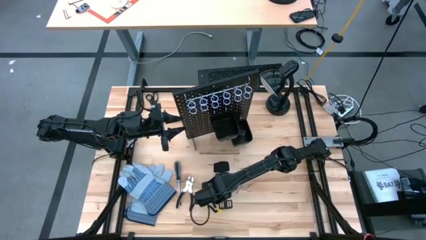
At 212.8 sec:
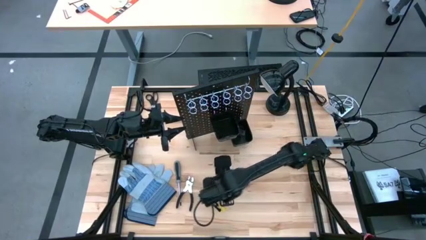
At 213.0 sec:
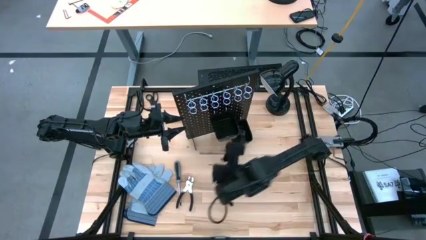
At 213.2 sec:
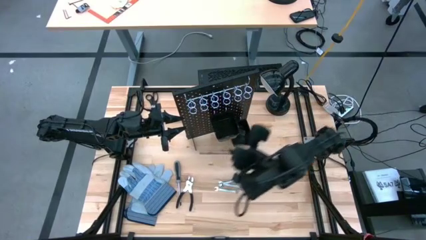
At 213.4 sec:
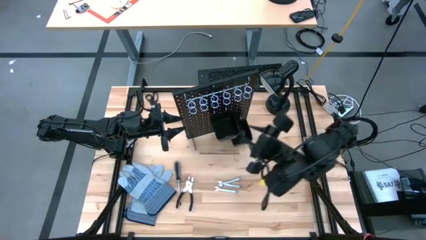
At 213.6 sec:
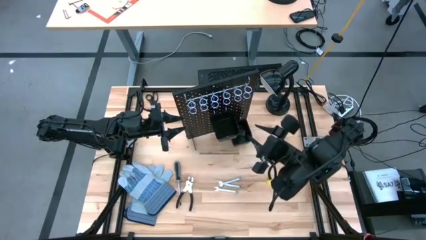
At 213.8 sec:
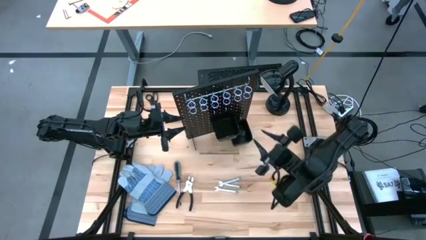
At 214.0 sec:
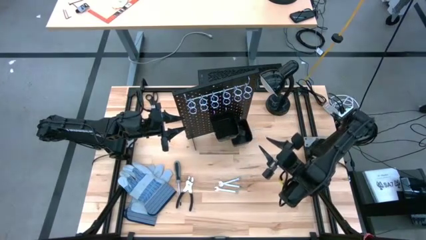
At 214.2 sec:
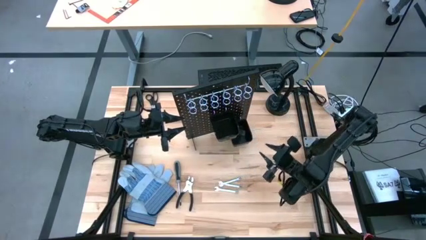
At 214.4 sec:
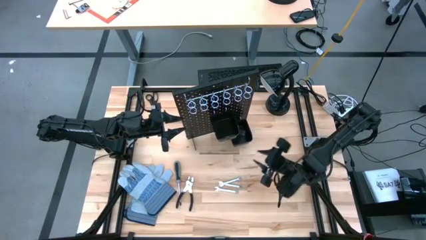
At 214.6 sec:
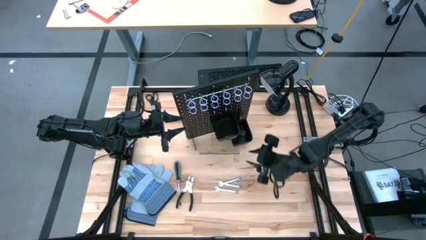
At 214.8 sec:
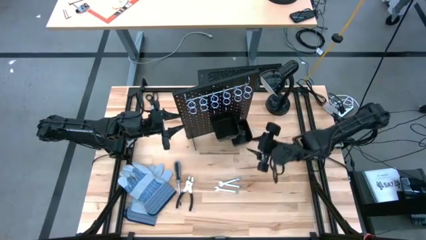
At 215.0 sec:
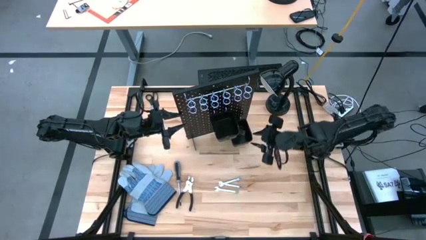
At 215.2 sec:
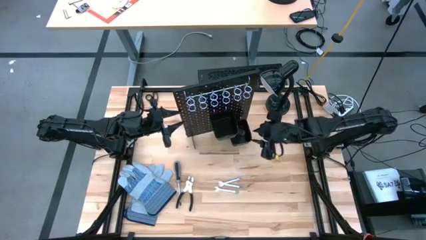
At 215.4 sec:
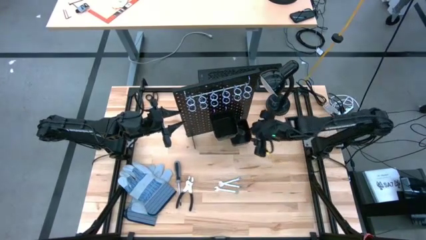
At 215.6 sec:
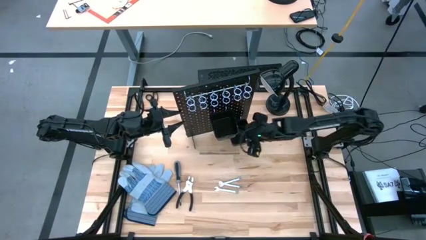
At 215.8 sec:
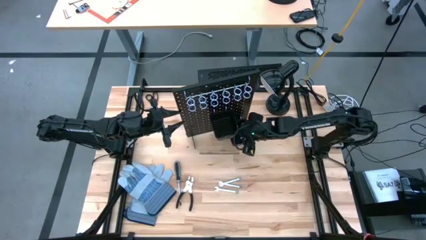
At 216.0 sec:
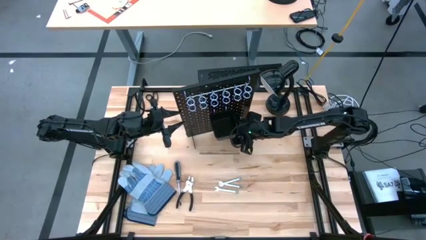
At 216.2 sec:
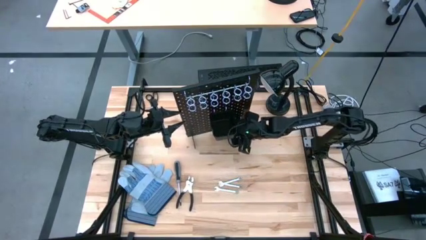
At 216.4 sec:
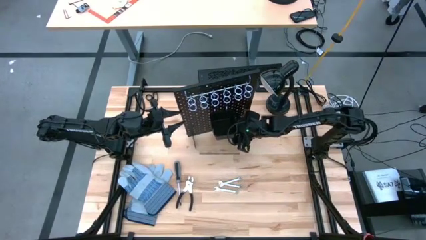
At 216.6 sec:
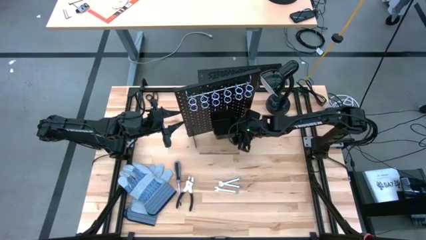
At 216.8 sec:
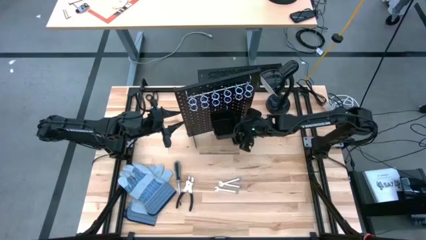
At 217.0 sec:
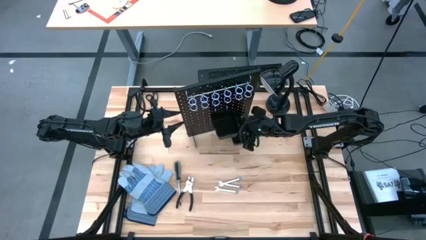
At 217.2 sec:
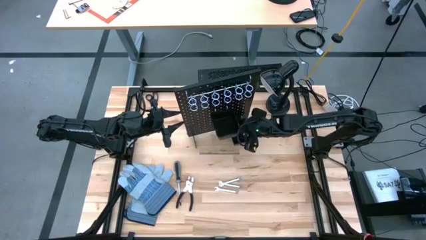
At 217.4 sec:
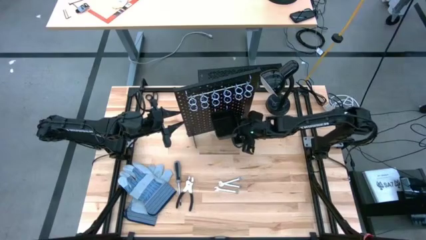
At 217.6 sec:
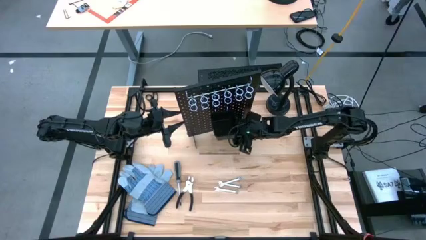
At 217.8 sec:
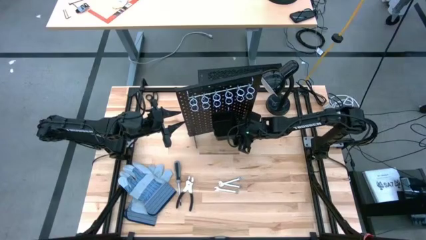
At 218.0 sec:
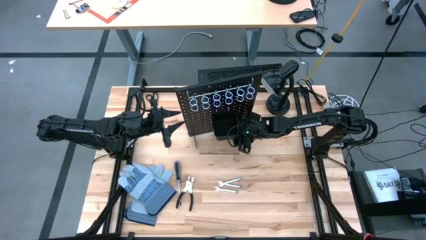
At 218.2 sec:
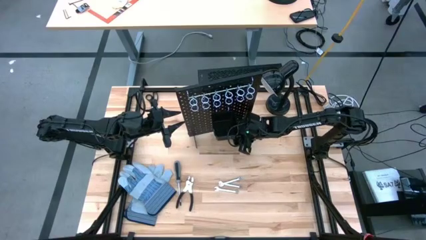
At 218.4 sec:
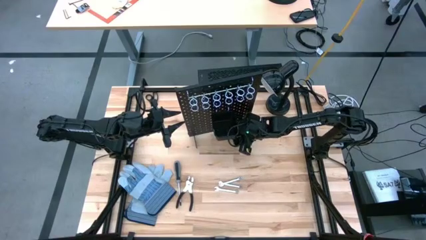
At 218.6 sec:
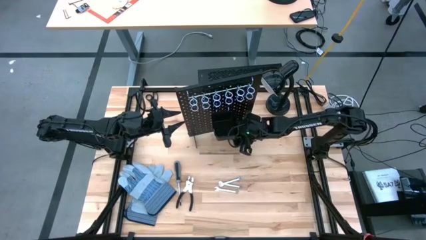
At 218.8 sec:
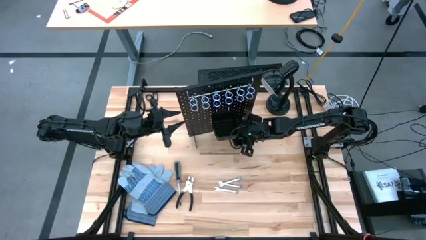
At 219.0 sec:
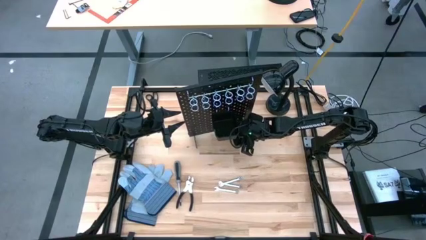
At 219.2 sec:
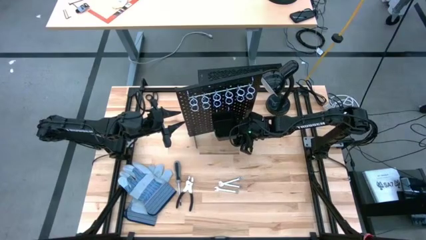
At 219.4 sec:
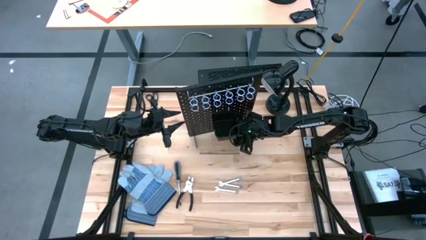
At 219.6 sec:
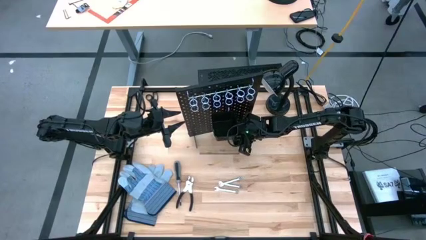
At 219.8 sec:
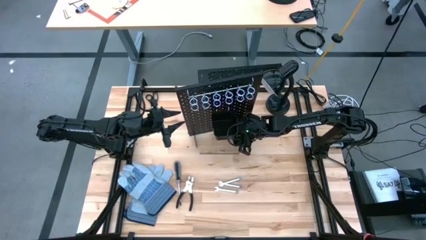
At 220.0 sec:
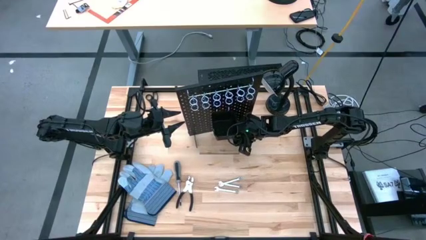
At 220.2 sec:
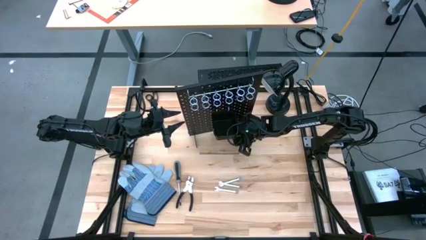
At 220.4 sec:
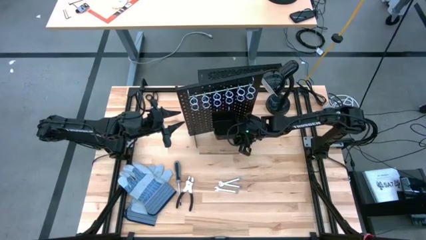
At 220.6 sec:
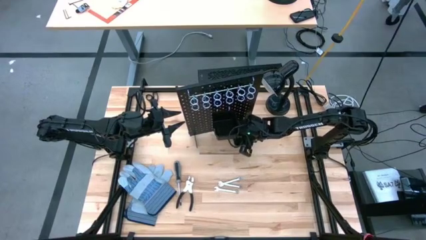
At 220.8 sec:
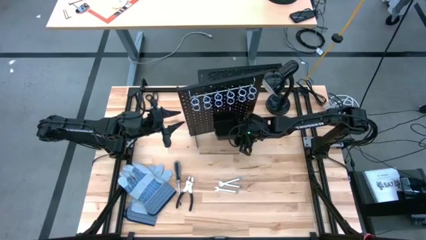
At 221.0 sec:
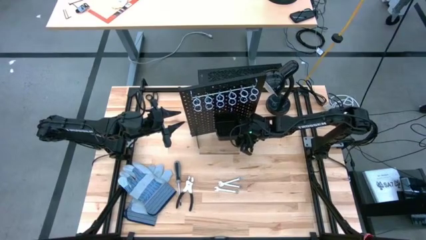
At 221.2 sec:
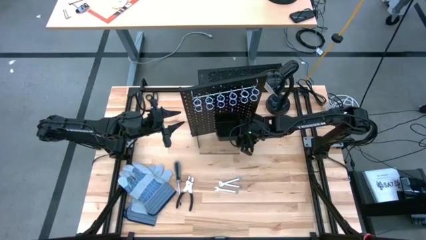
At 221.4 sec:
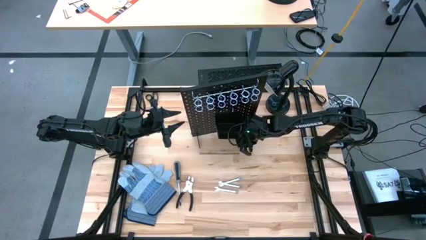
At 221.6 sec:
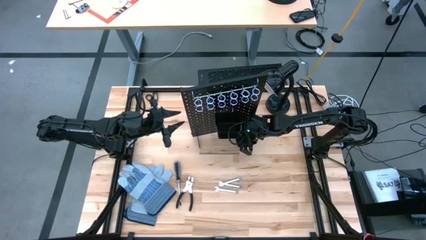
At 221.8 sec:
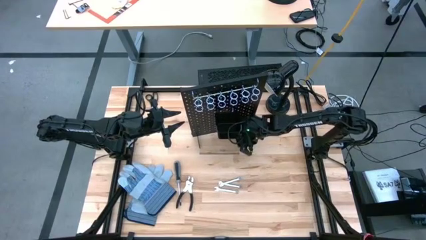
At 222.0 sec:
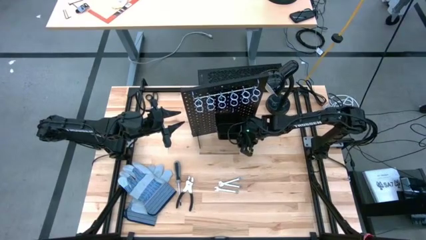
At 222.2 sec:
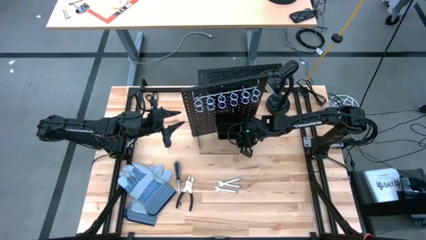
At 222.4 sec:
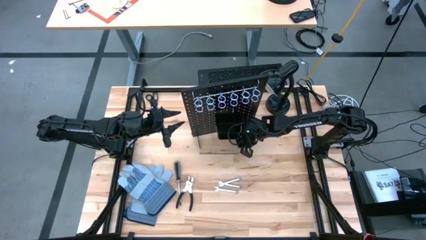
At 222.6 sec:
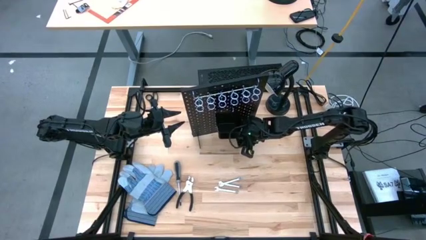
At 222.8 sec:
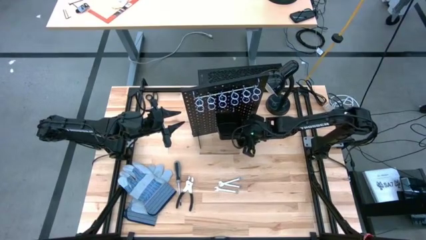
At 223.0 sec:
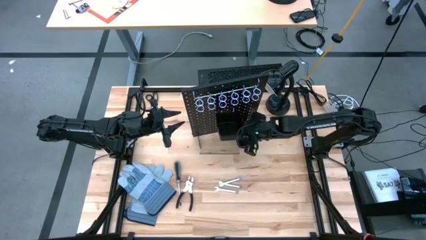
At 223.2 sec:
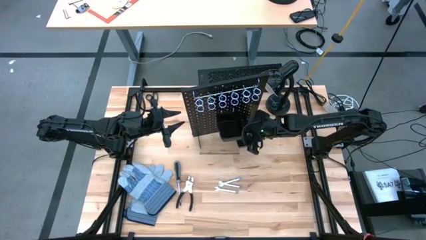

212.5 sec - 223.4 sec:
Task: Hang tools onto peg board
Remove the black utility knife blades from the bottom black bin of the black pegboard

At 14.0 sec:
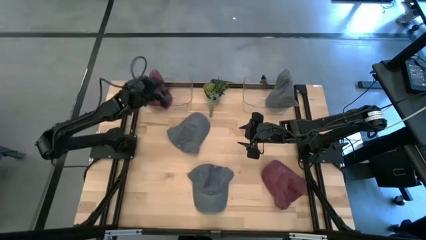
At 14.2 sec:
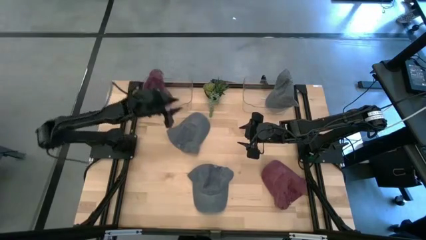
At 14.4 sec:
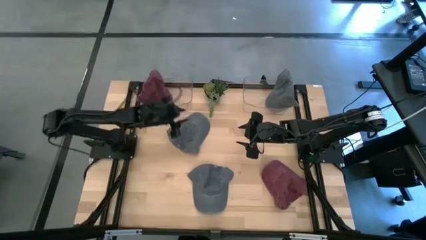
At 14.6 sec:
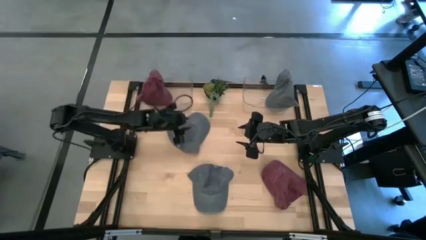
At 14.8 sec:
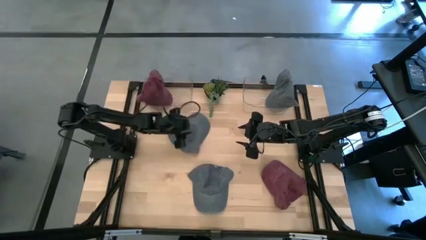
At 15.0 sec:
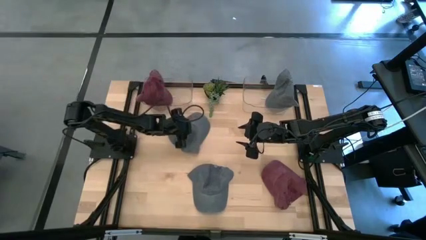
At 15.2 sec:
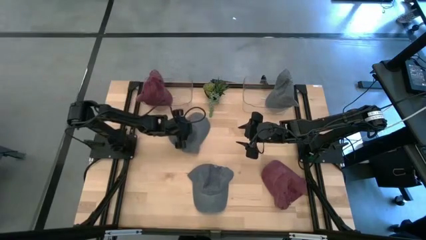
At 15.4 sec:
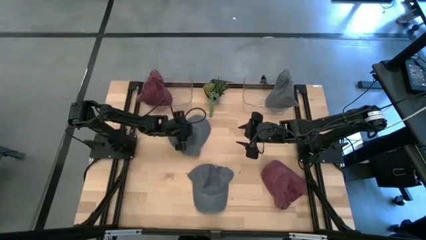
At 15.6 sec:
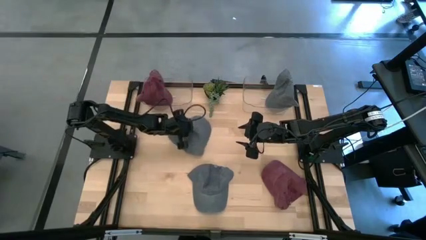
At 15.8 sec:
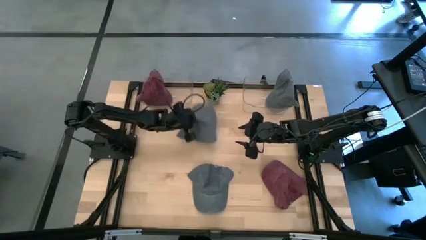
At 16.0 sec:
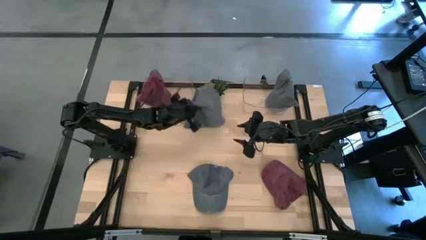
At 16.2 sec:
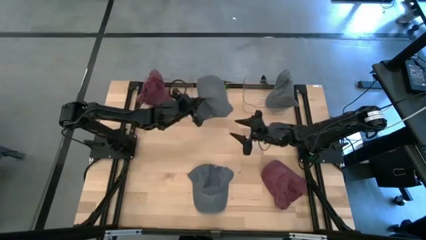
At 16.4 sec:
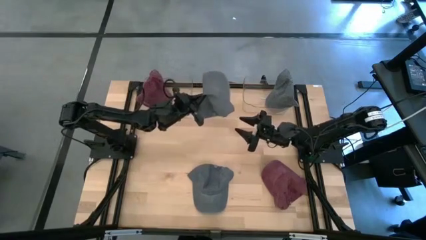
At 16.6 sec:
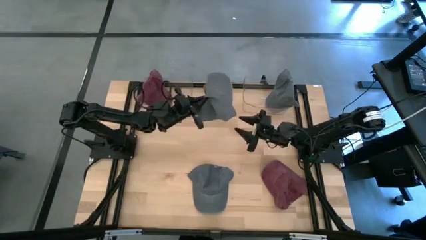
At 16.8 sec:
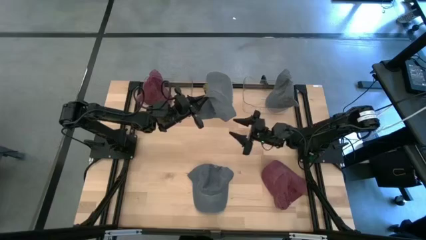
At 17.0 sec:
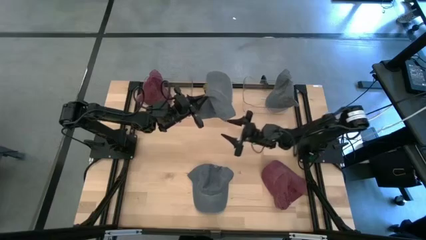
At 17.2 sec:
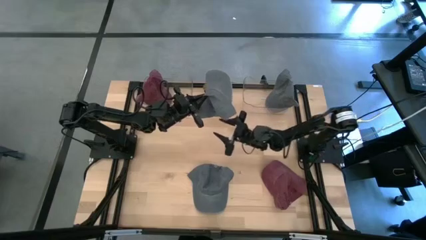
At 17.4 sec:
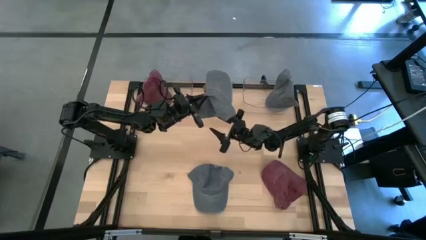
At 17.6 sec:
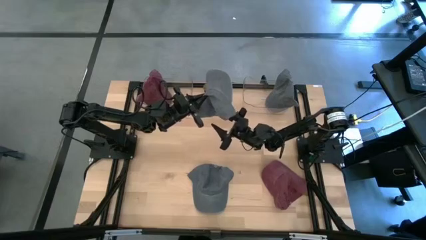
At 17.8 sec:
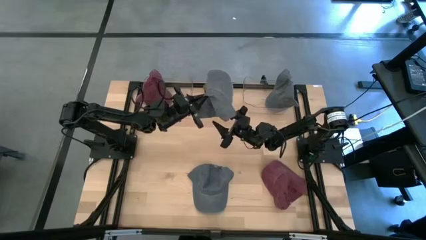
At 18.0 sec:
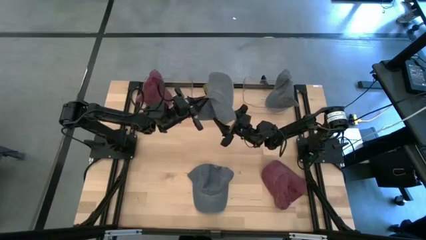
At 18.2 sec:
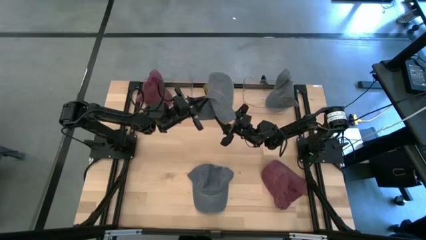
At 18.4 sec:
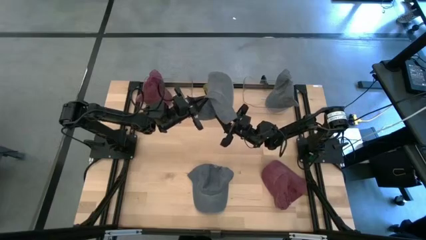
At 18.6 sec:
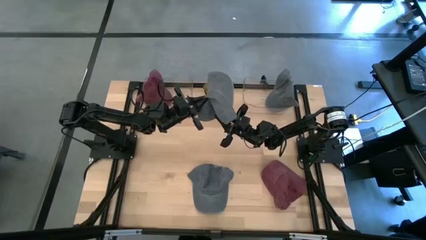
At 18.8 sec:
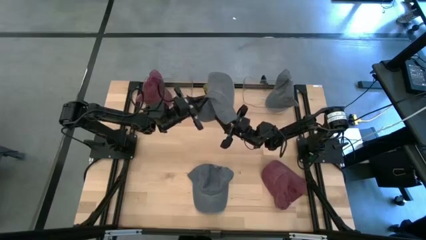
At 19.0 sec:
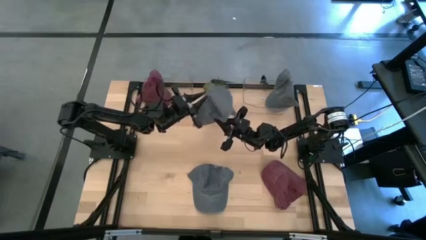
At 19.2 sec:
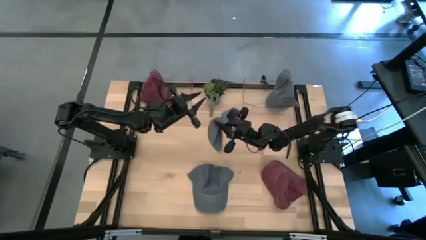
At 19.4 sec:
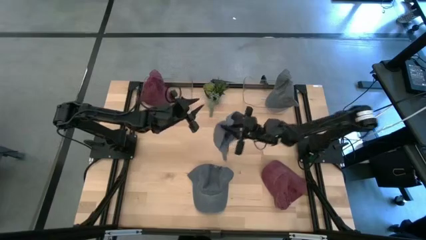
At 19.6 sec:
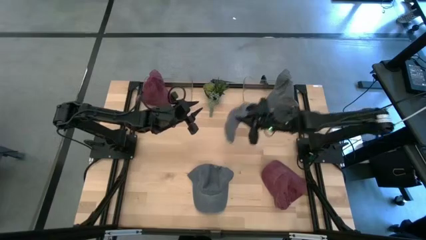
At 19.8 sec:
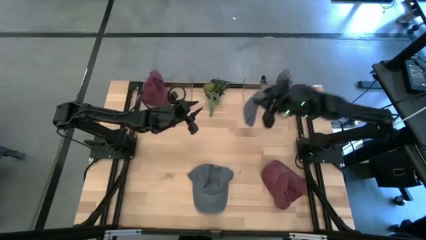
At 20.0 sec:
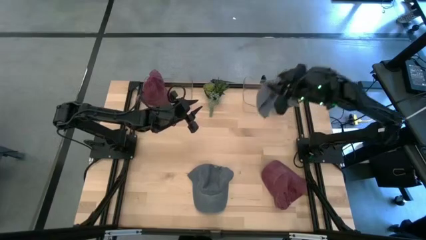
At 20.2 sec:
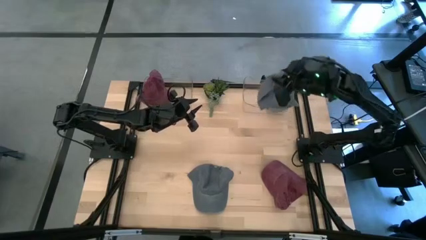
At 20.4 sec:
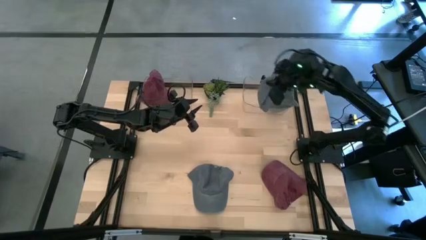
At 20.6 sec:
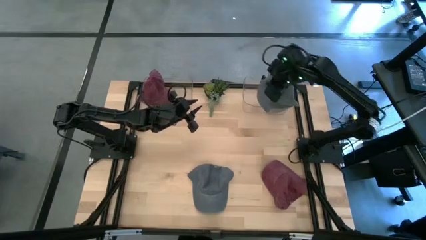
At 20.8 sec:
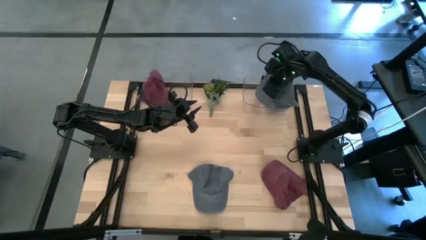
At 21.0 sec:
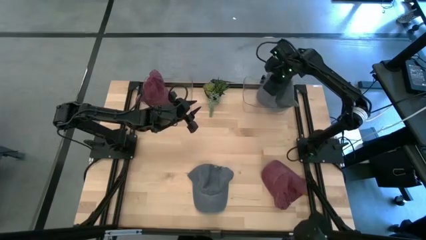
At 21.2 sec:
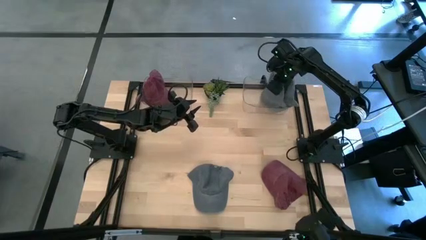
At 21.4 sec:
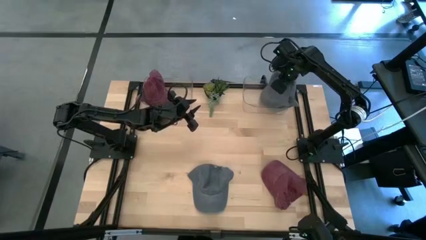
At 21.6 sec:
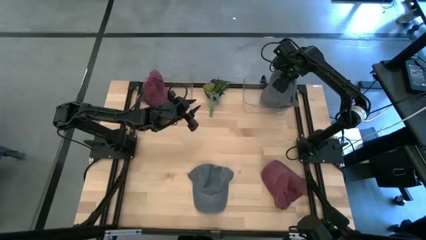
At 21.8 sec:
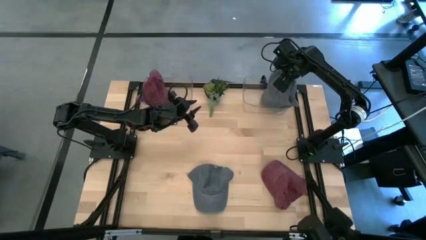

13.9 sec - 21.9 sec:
Task: Pick & Place hat
Put the top gray cap into the right transparent bin
